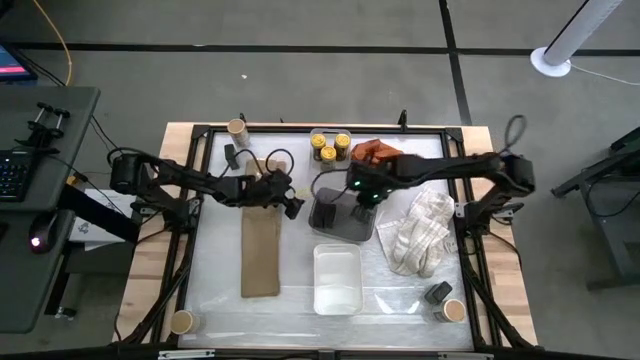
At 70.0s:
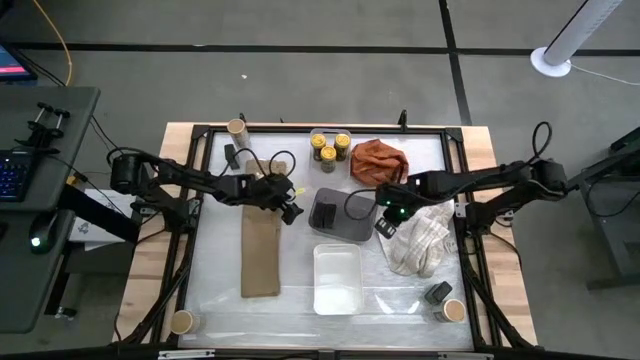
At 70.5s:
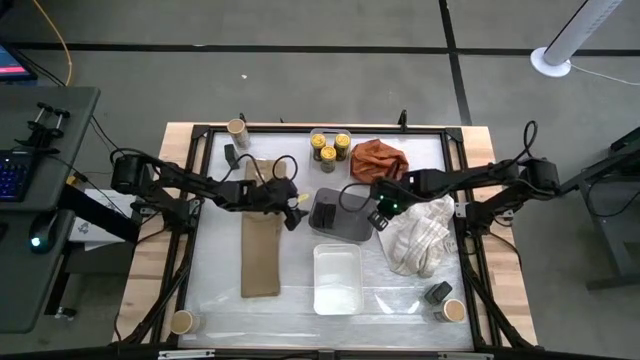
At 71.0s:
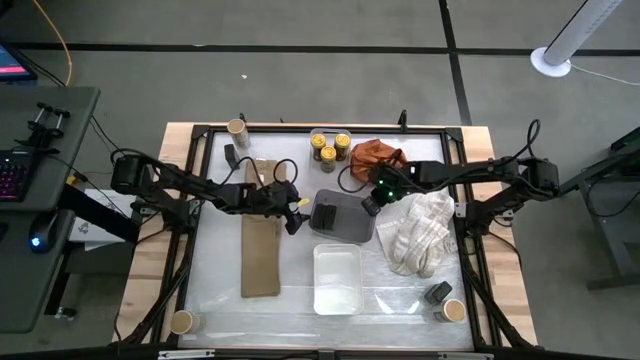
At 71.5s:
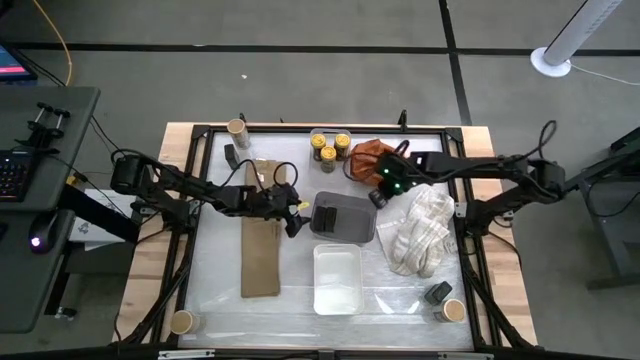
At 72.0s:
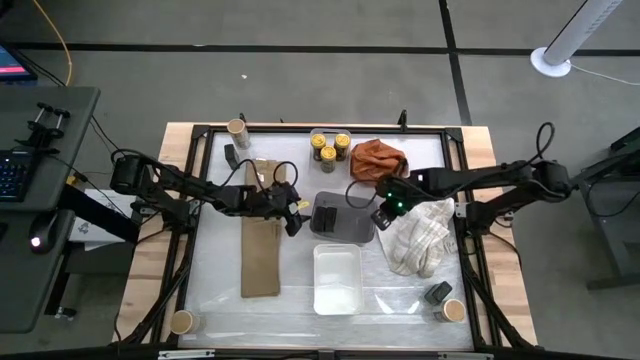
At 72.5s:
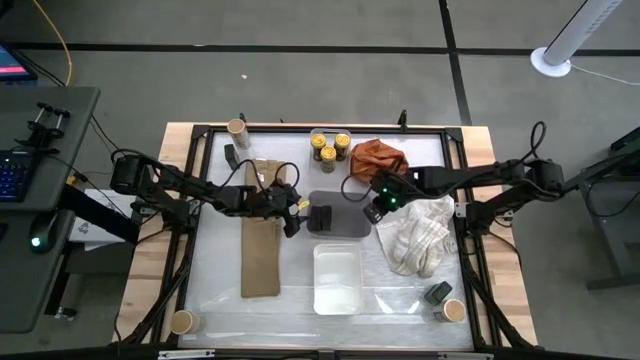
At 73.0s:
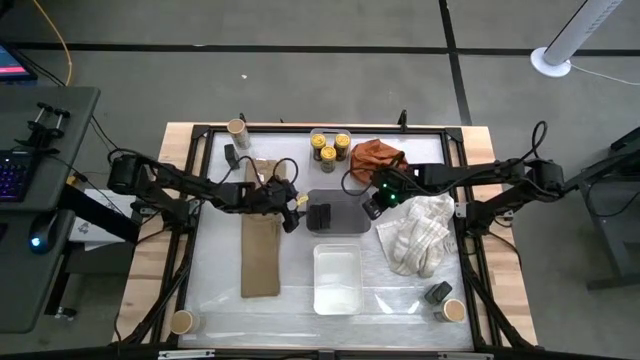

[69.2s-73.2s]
Task: Sort spices by type
Adjust the black bin on the table

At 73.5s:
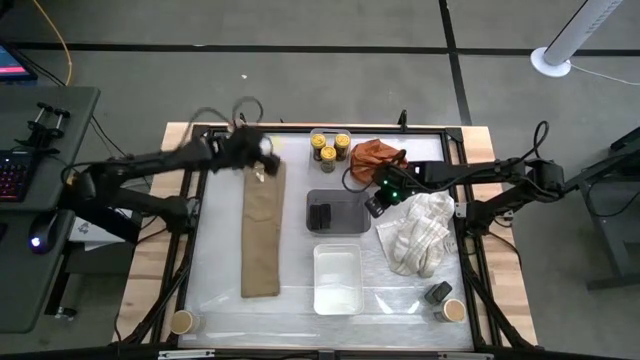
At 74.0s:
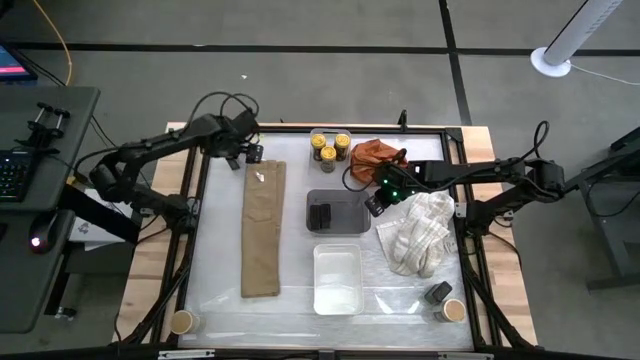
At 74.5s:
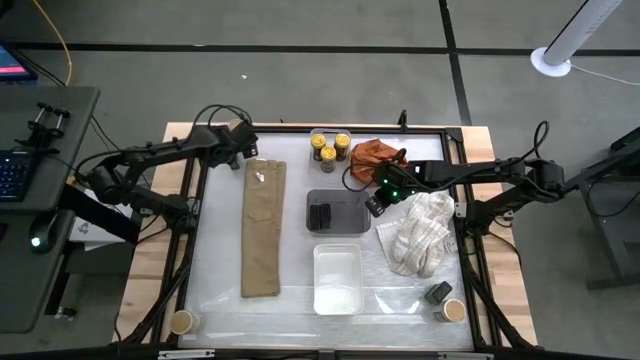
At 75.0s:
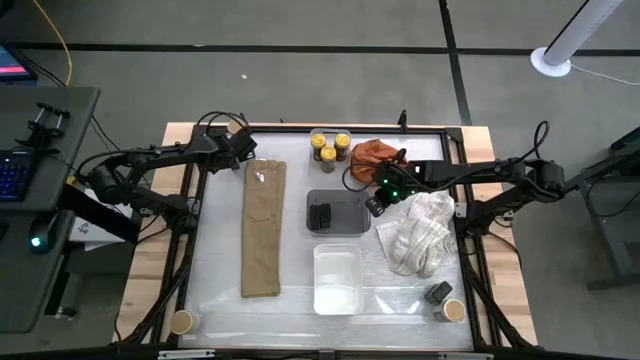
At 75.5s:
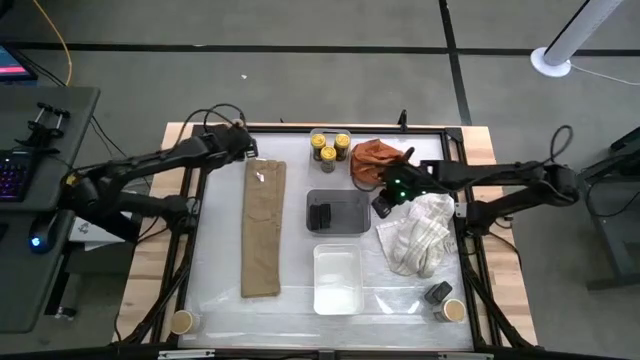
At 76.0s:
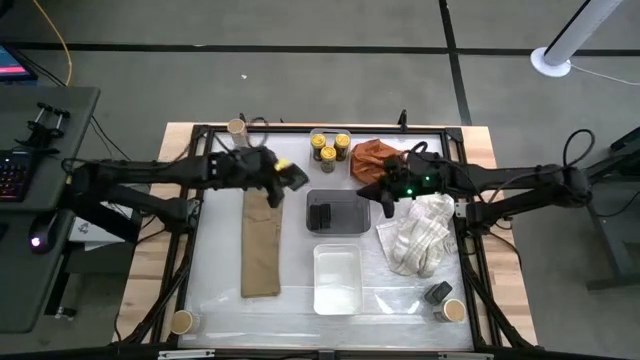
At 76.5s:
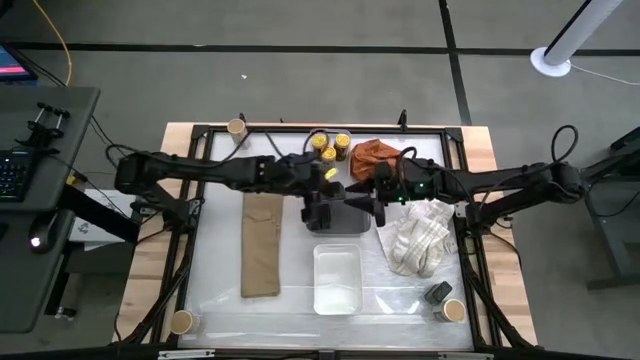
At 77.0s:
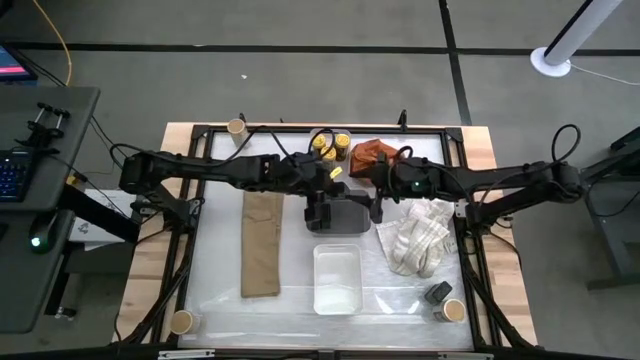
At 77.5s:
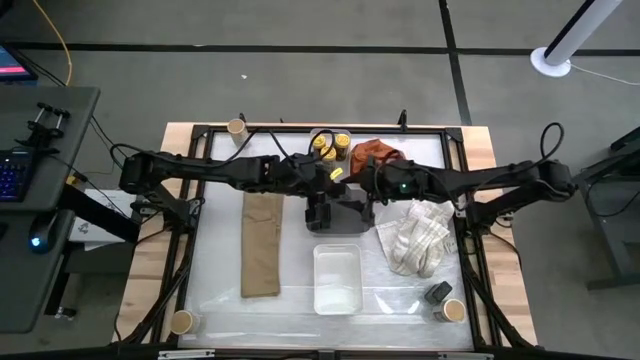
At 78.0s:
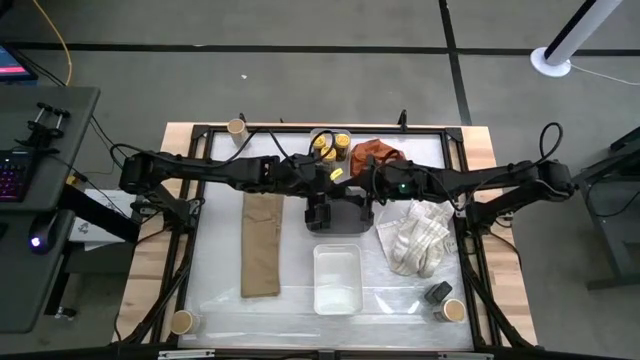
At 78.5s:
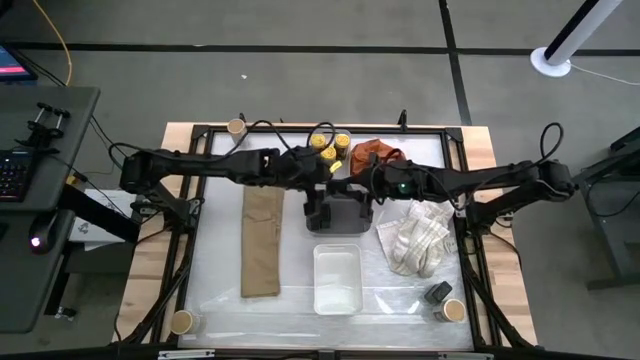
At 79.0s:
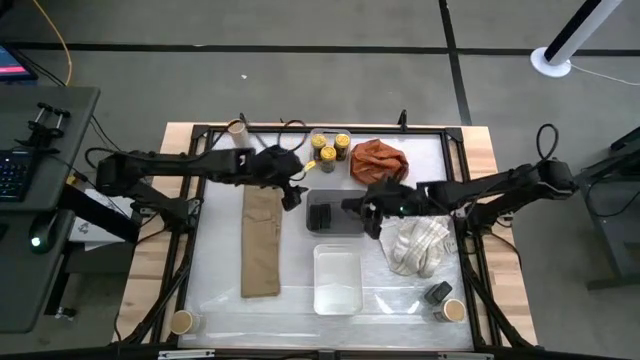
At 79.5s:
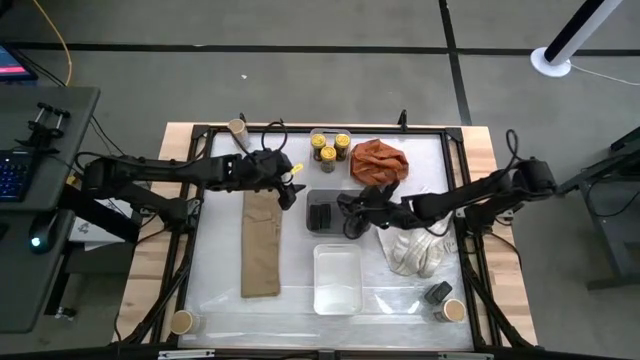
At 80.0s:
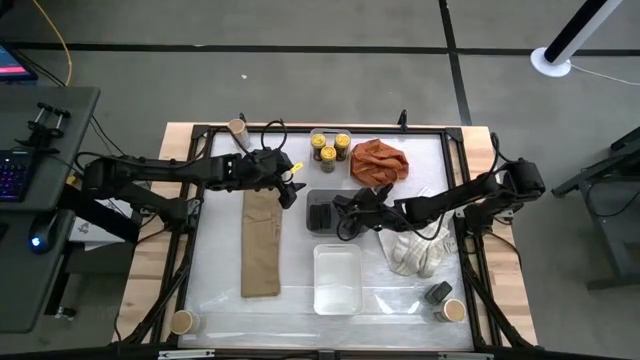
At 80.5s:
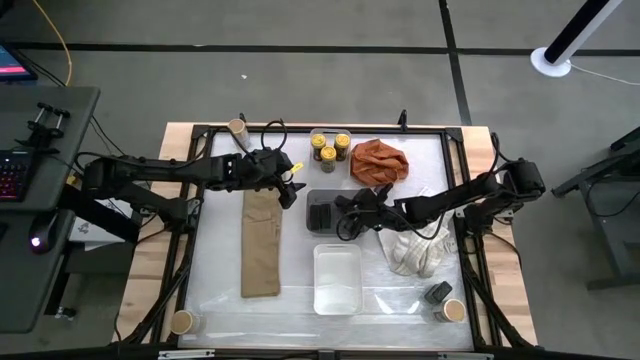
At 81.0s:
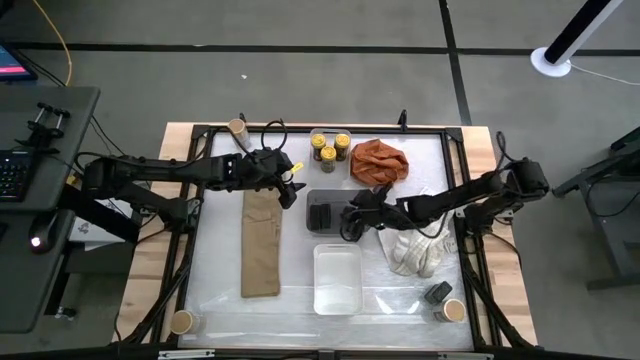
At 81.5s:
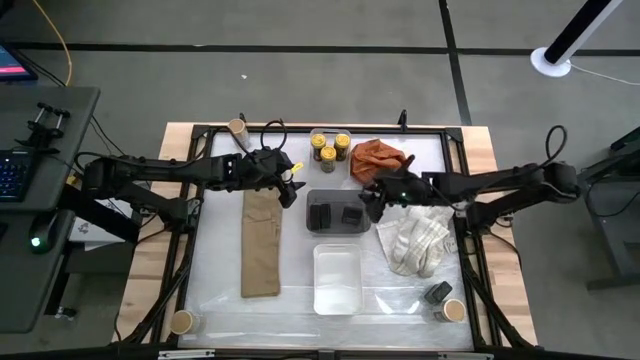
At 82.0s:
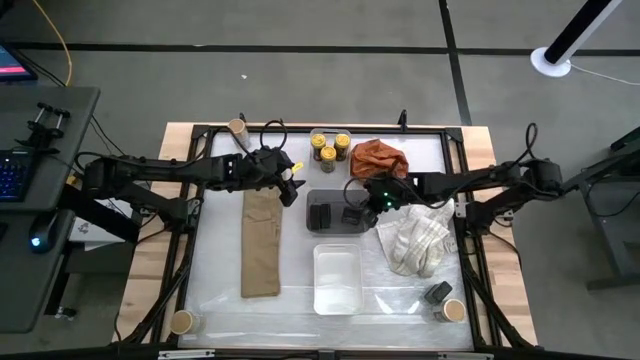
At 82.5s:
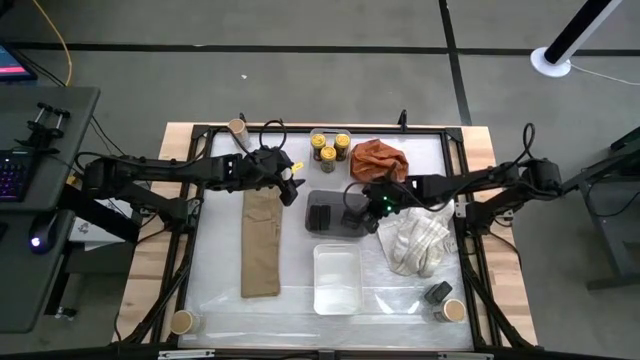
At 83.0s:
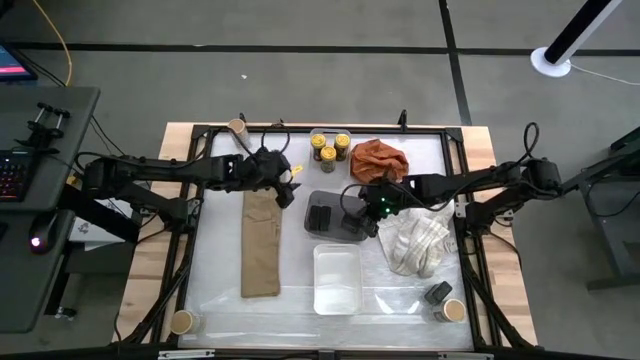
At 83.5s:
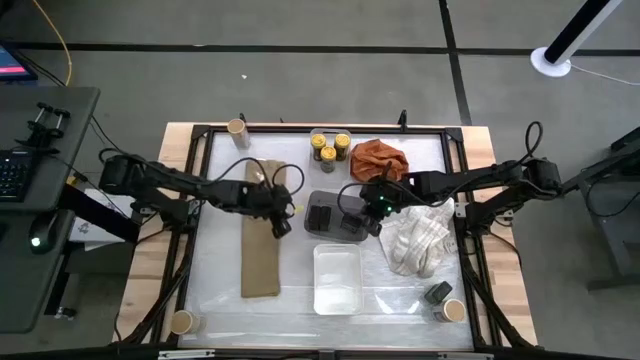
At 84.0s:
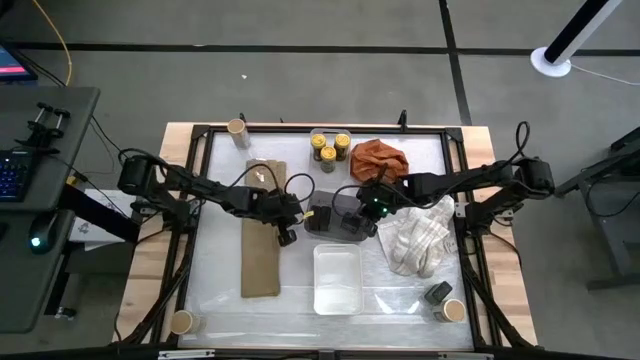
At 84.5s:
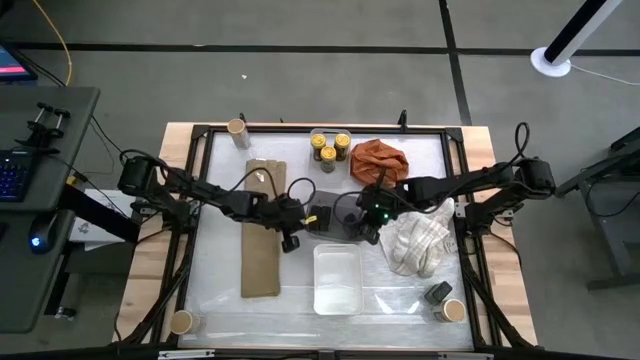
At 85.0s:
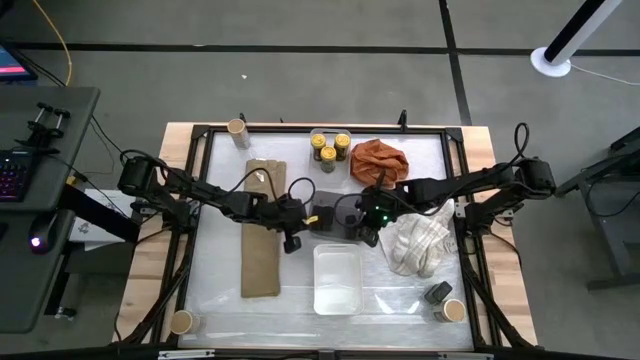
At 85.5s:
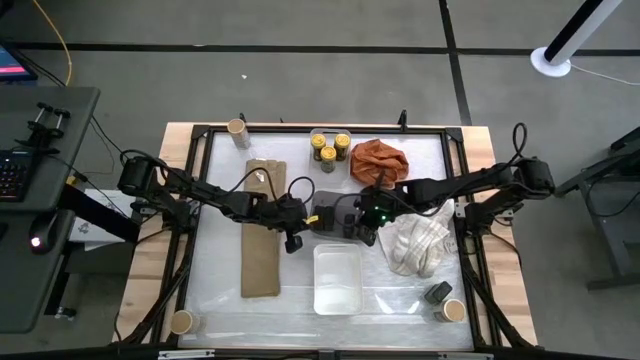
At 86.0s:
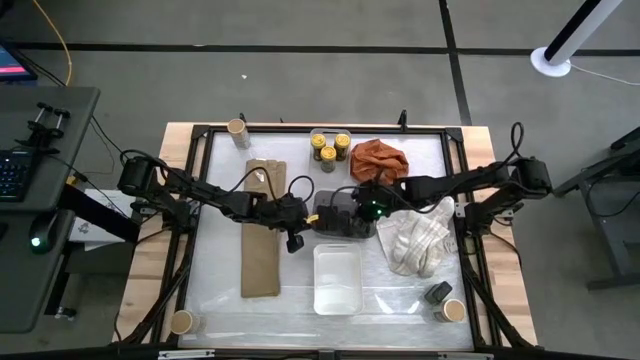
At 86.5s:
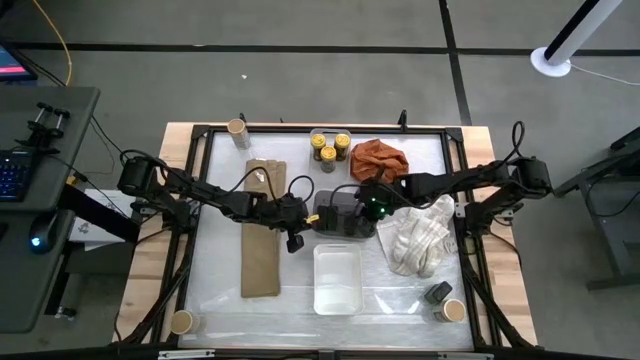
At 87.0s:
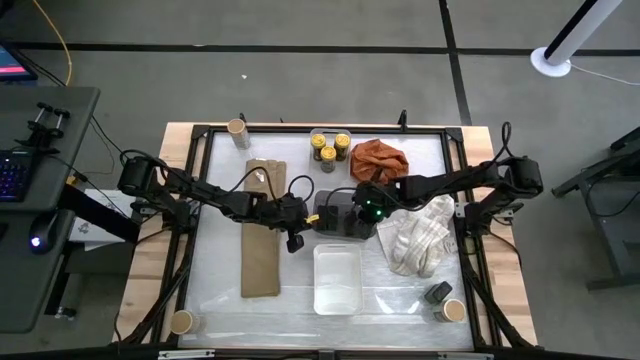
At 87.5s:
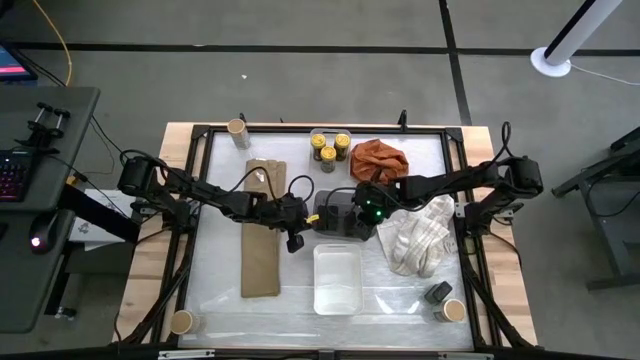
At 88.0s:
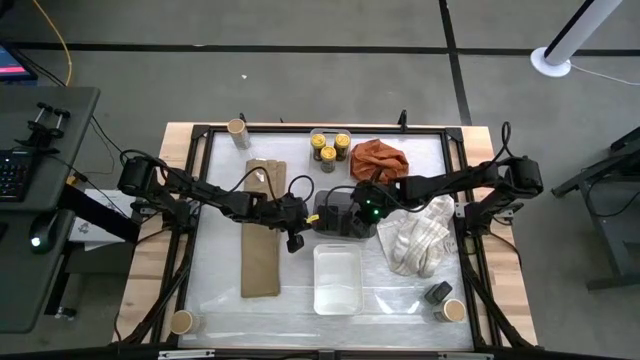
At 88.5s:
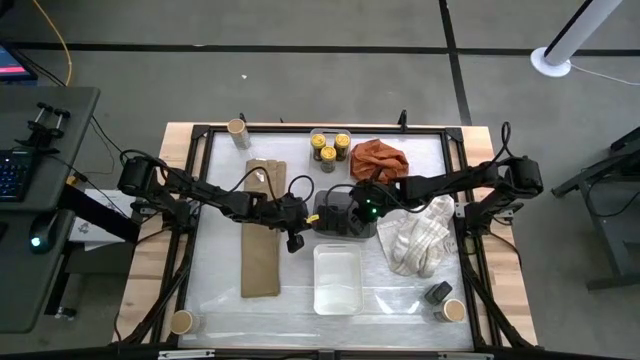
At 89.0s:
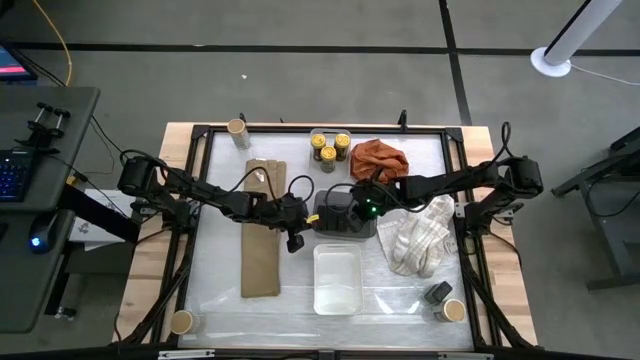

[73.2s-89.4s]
Put the top black seasoning can into the black bin

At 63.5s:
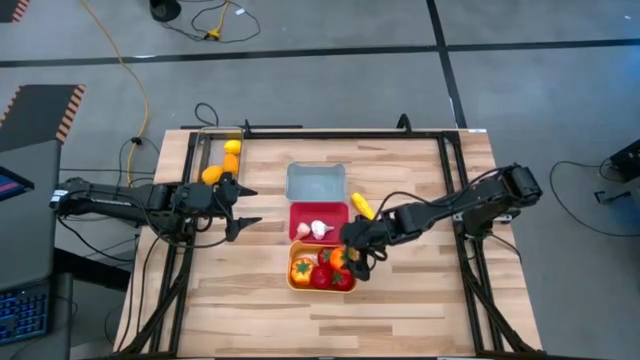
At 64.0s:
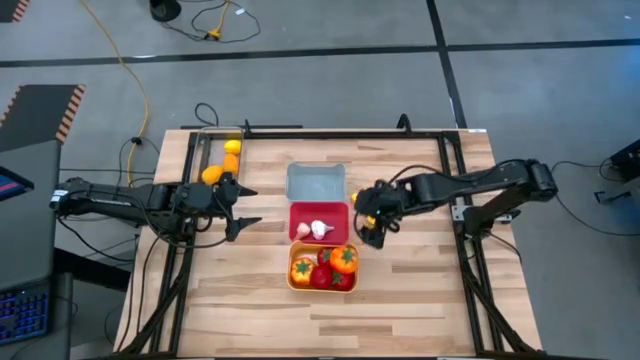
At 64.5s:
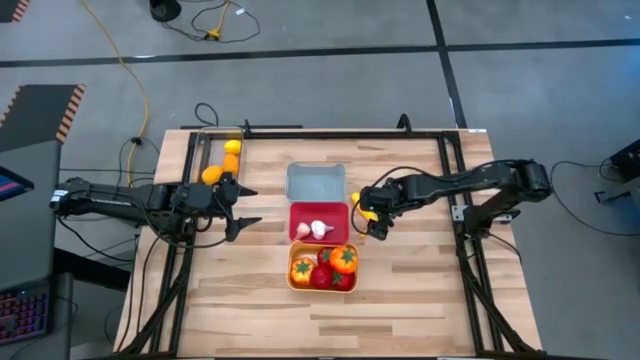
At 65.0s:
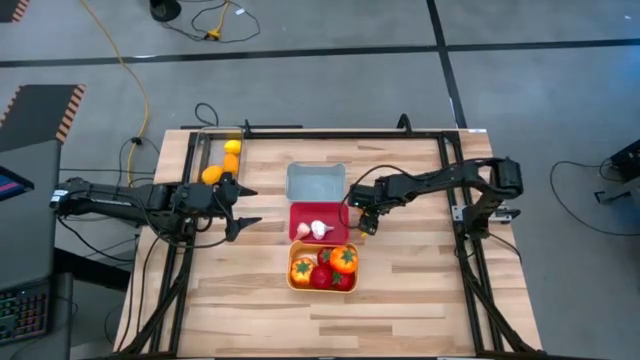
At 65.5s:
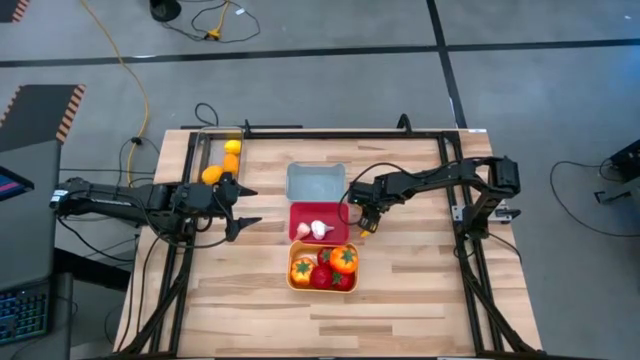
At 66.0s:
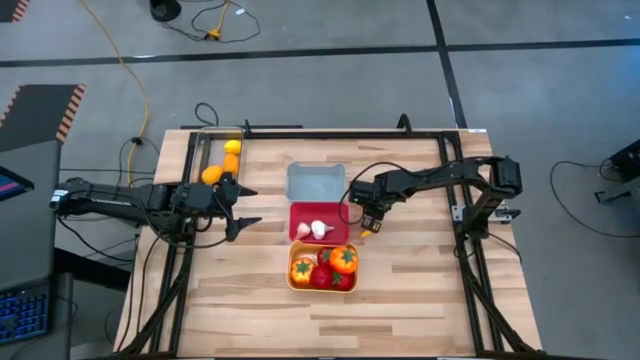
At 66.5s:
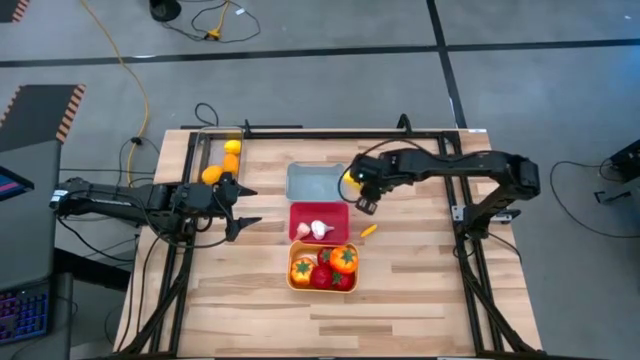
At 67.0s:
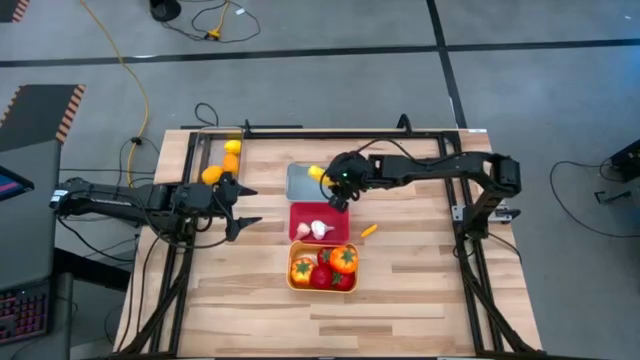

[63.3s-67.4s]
Task: Sort produce into baskets
Put the top yellow corn into the gray bin
